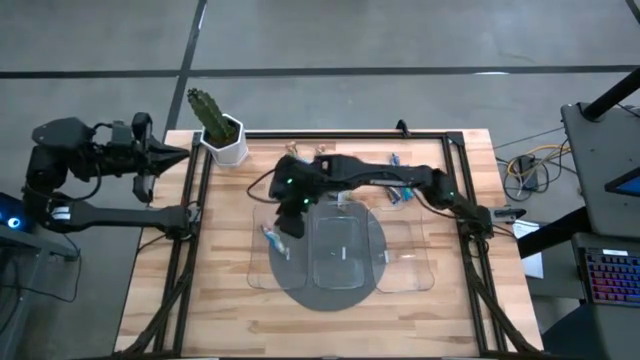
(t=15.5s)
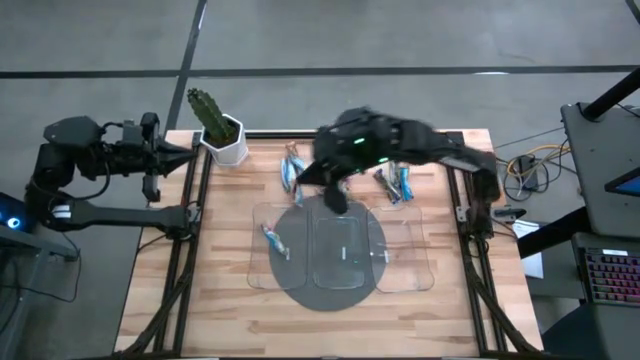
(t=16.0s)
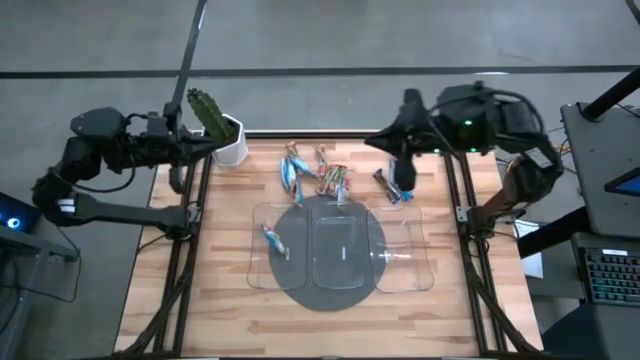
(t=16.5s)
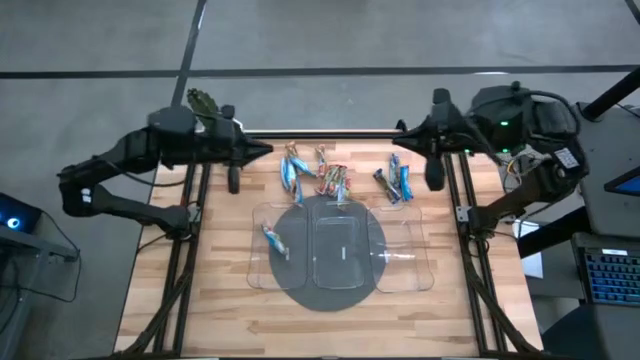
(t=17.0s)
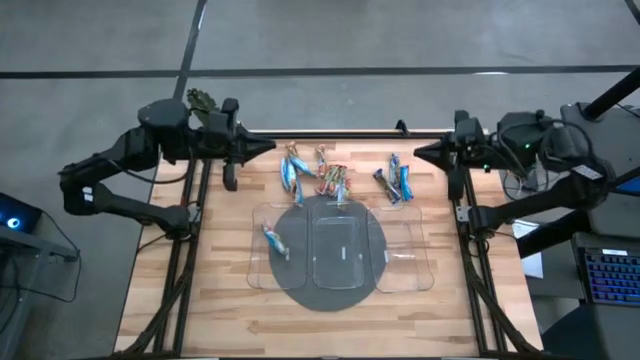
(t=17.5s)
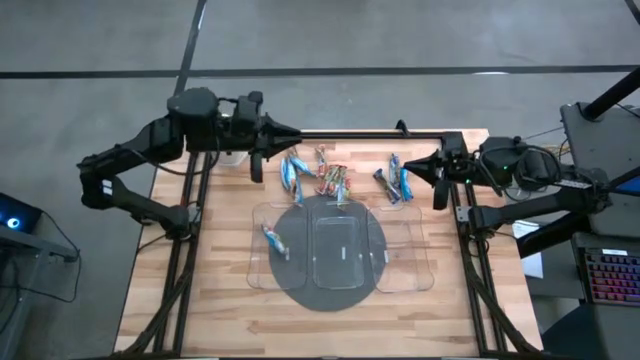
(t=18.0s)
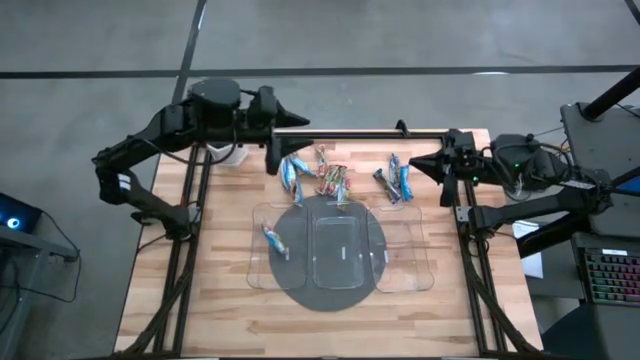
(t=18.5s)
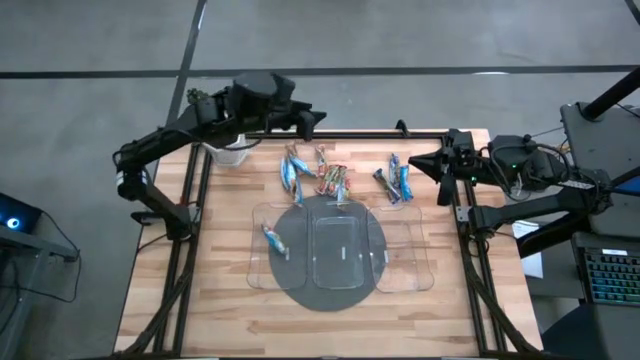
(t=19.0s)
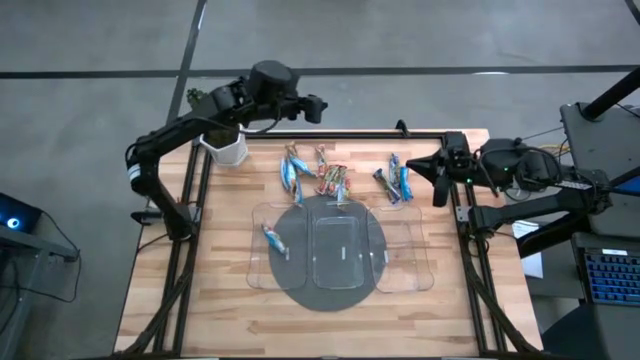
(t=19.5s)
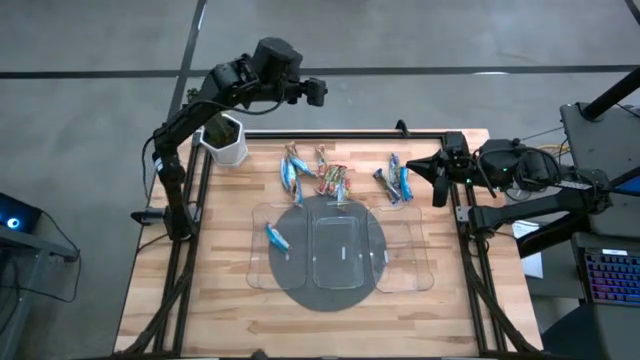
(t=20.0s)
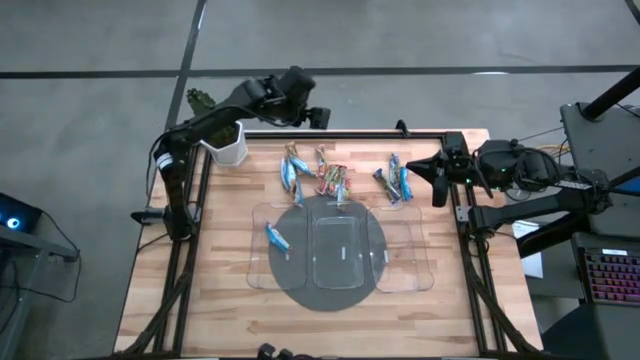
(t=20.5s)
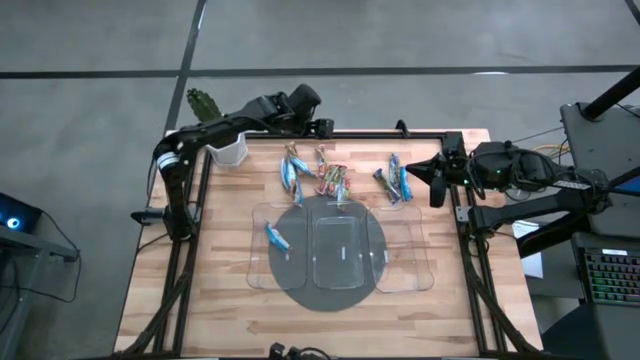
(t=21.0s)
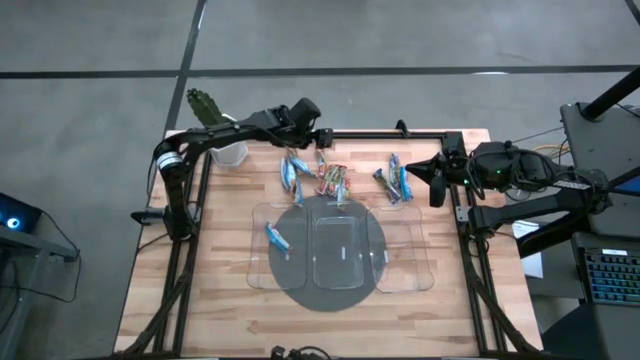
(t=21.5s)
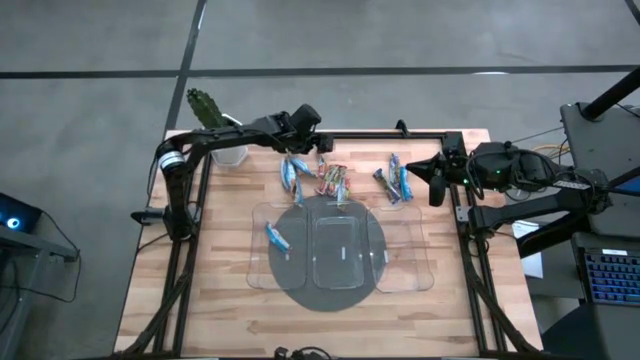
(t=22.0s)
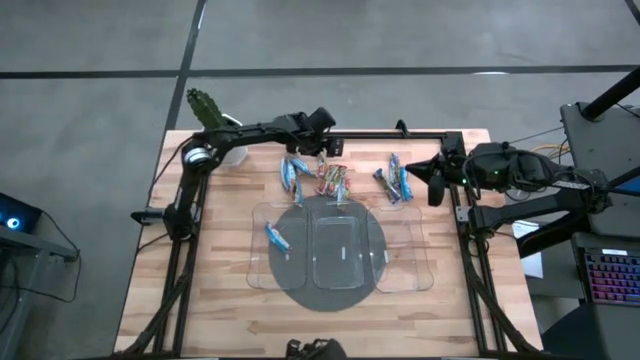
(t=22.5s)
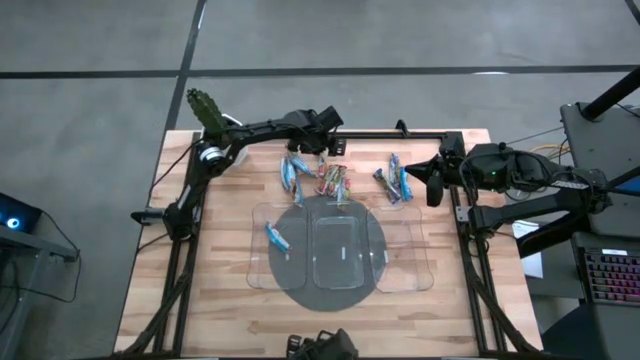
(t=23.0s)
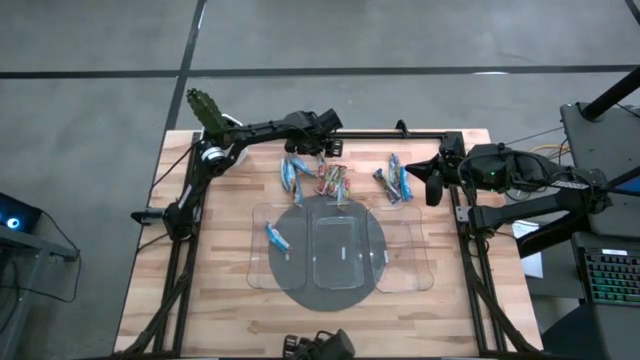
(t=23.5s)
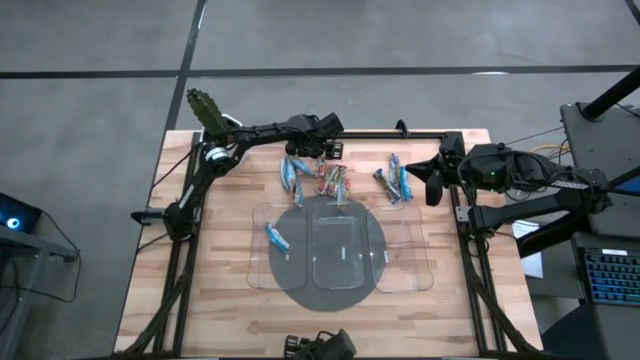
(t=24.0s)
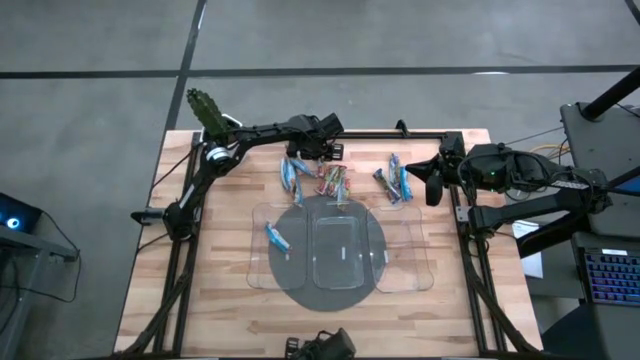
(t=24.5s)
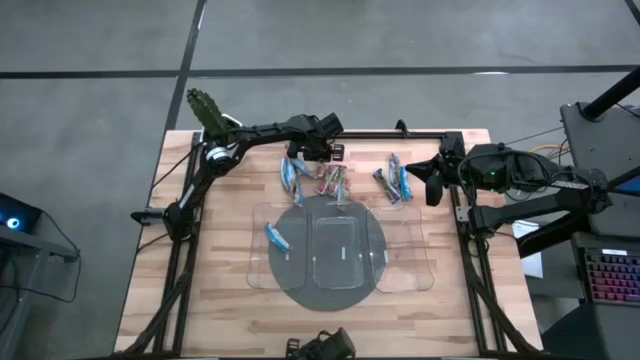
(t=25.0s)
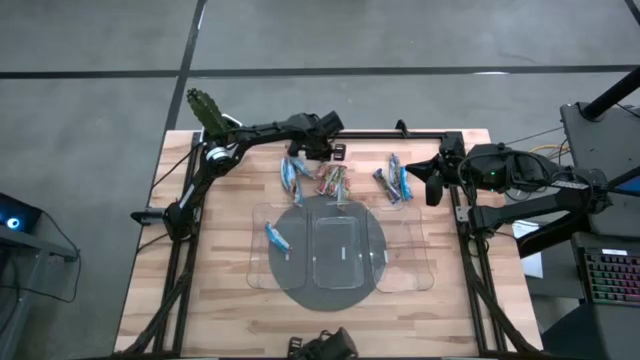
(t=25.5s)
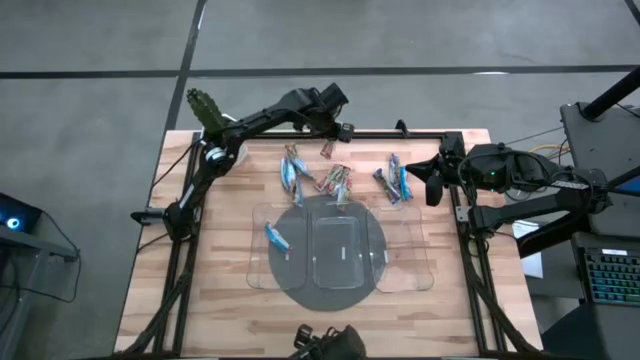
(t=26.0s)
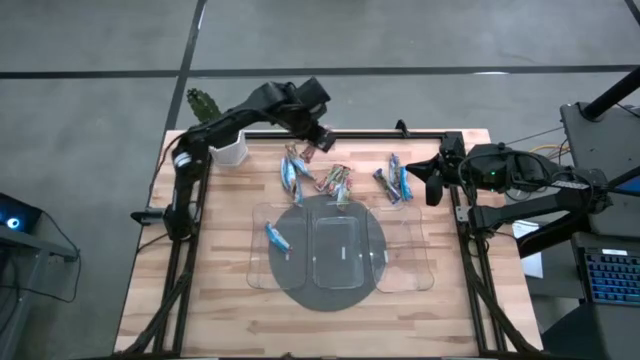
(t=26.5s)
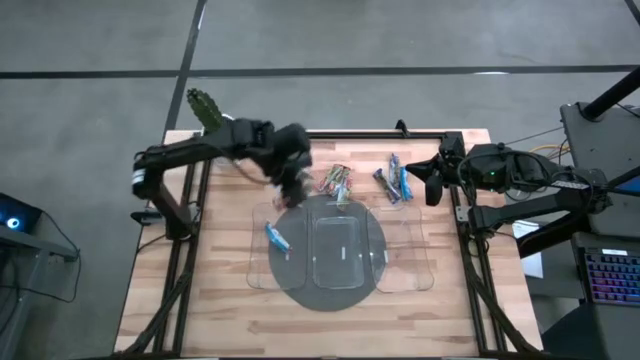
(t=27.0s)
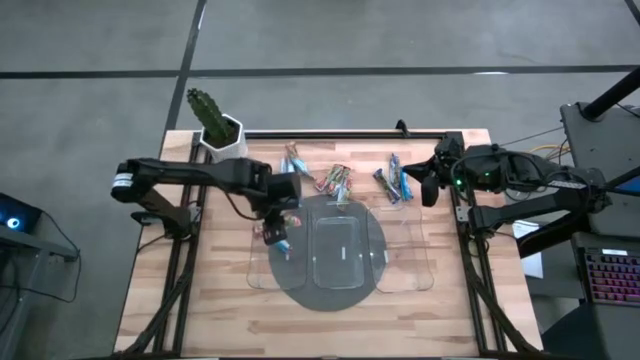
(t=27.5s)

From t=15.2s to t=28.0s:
Task: Pick and place Granola Bars by type
Put the red granola bar into the left transparent bin

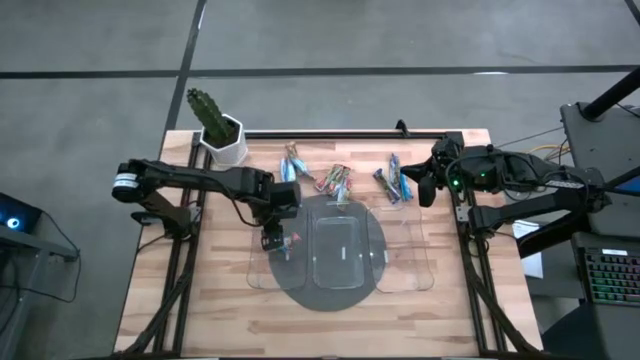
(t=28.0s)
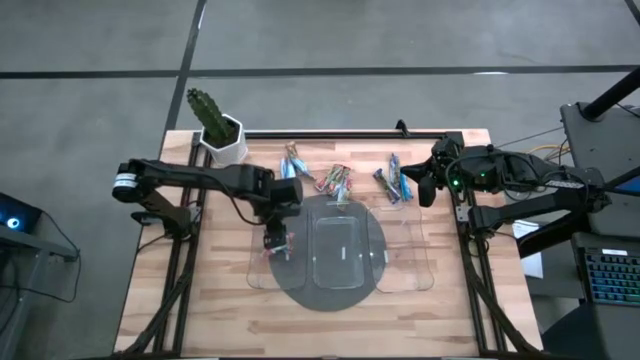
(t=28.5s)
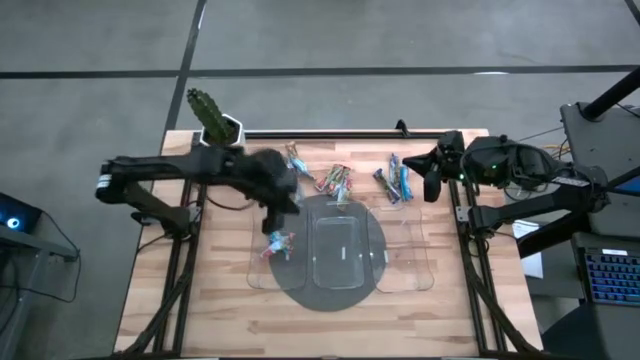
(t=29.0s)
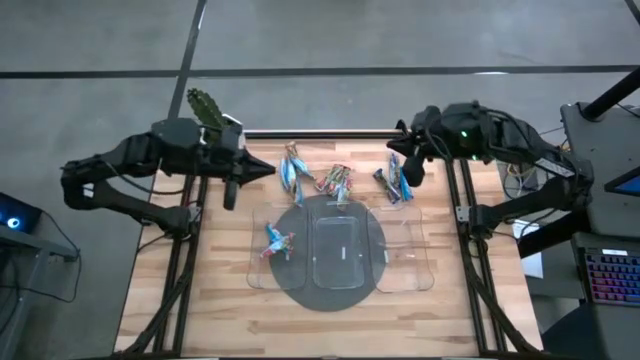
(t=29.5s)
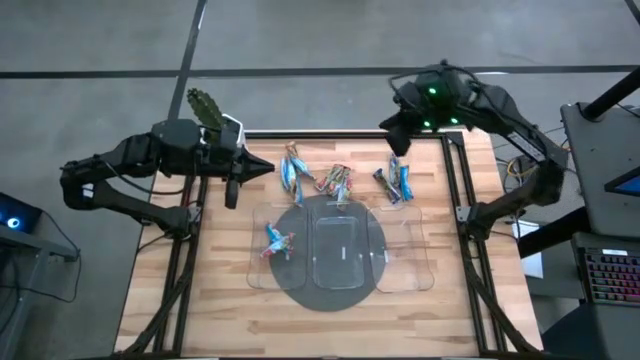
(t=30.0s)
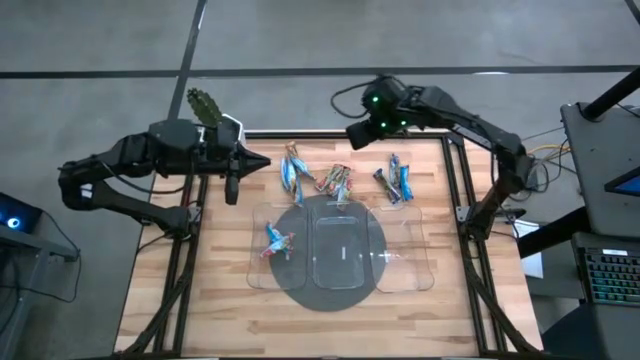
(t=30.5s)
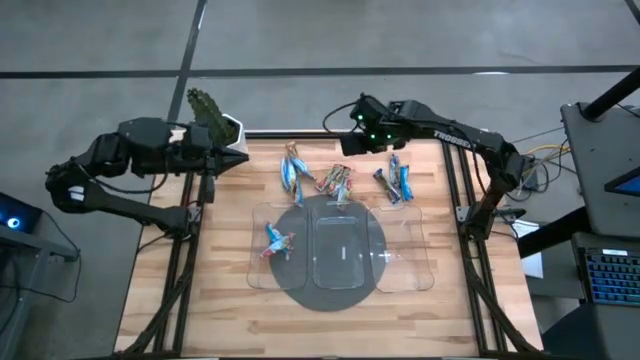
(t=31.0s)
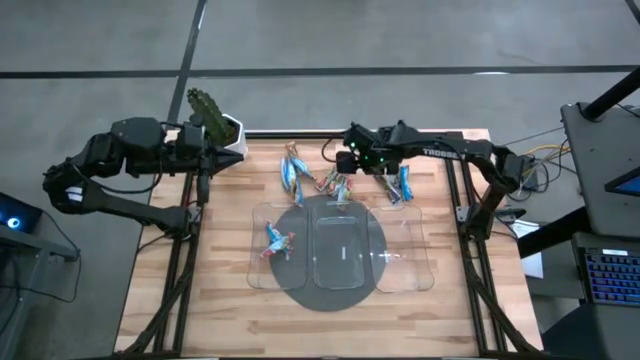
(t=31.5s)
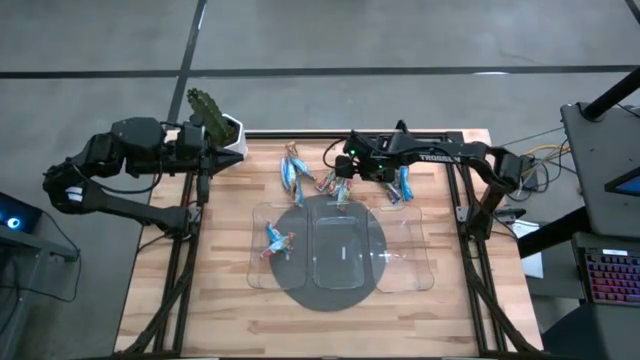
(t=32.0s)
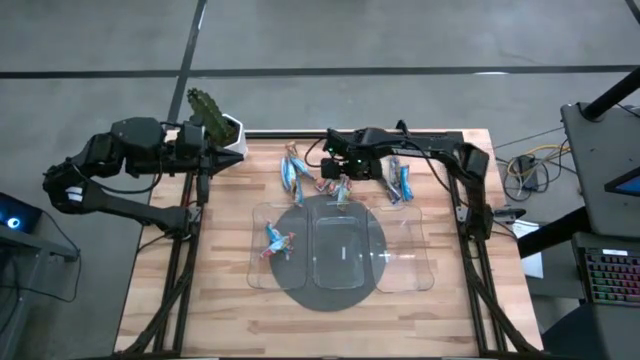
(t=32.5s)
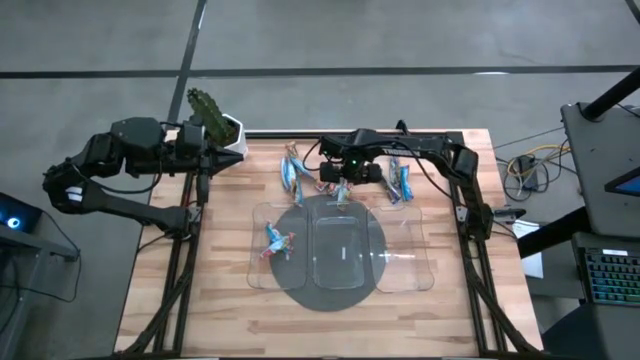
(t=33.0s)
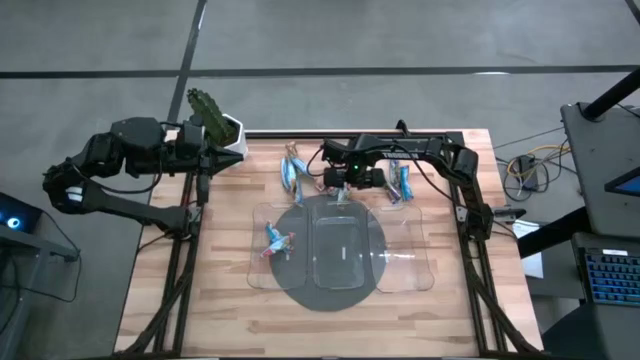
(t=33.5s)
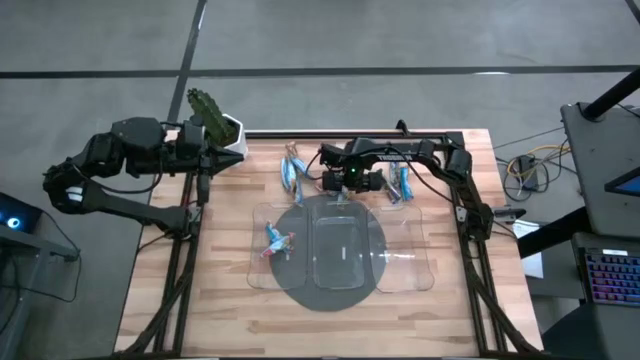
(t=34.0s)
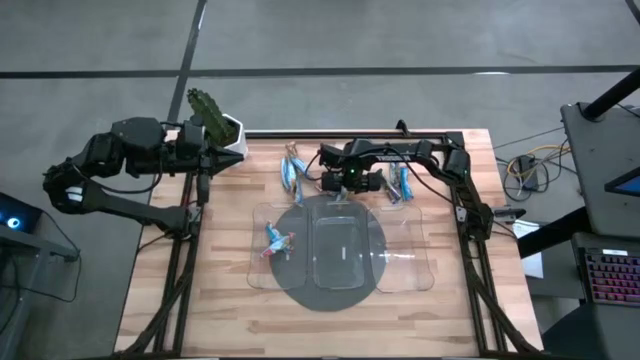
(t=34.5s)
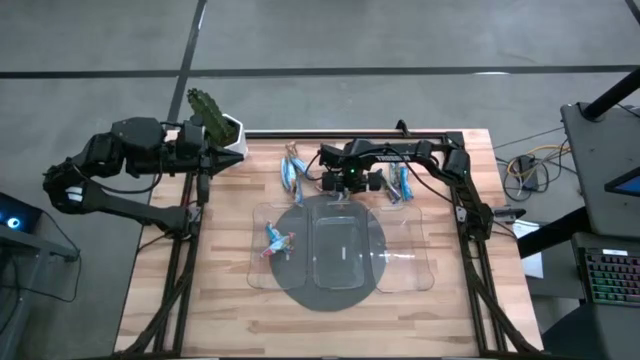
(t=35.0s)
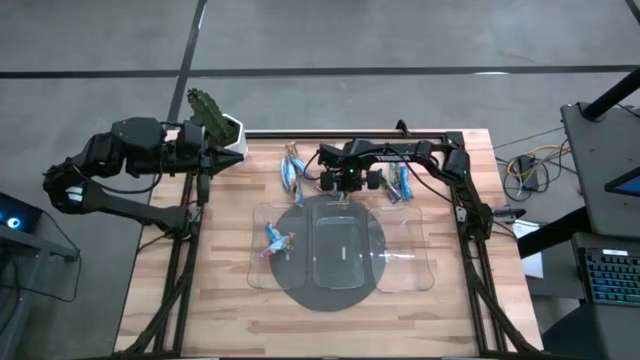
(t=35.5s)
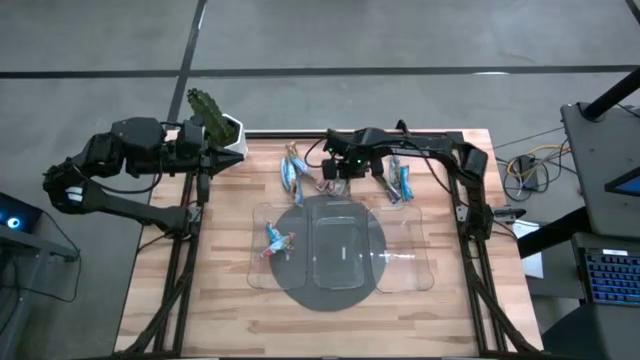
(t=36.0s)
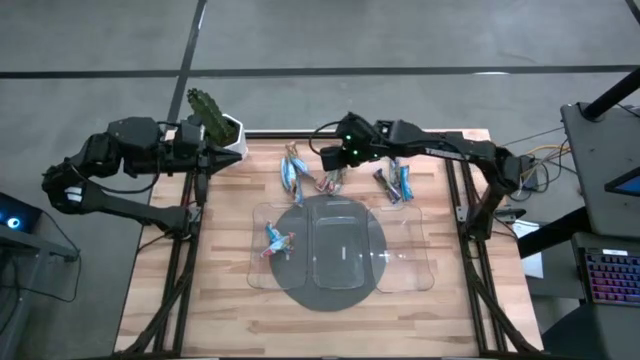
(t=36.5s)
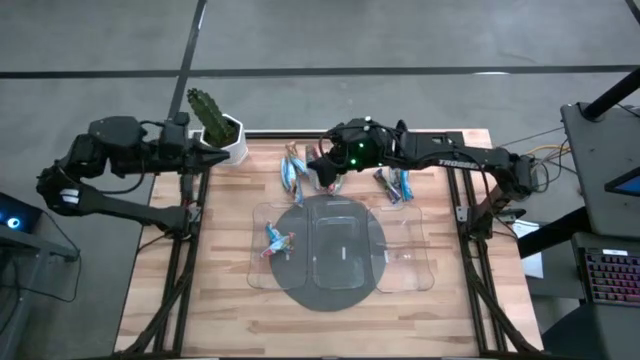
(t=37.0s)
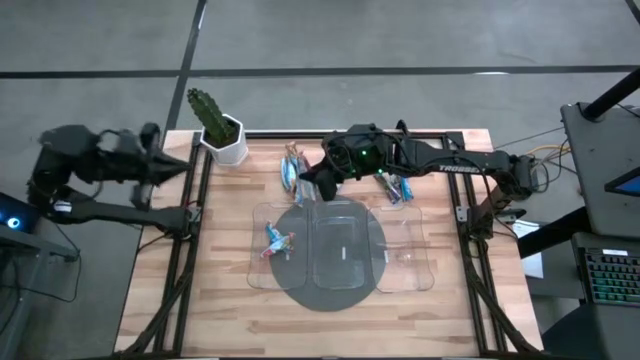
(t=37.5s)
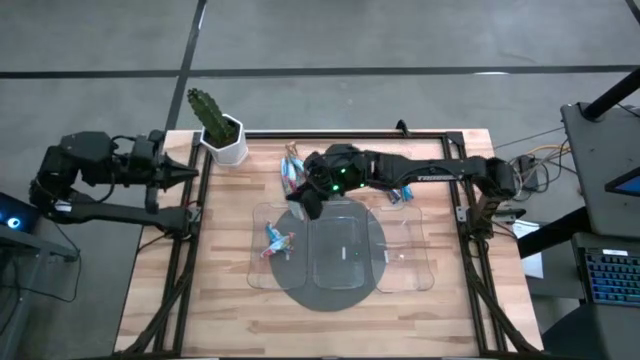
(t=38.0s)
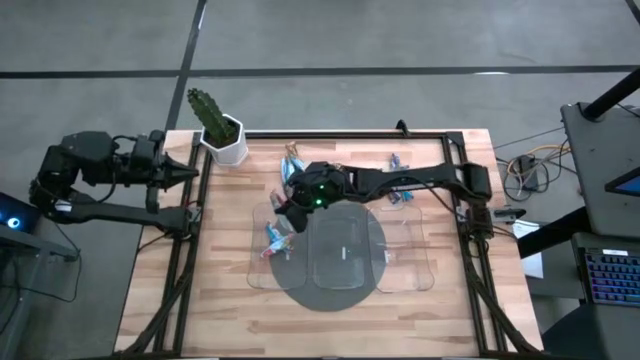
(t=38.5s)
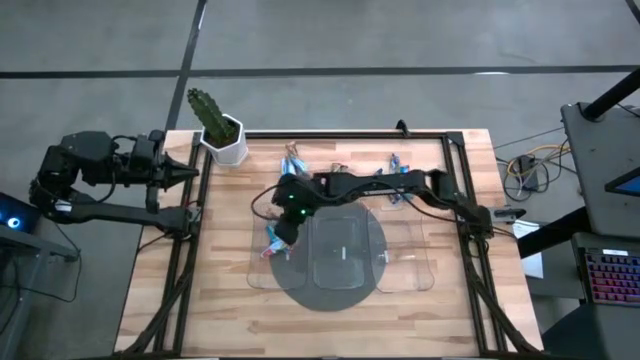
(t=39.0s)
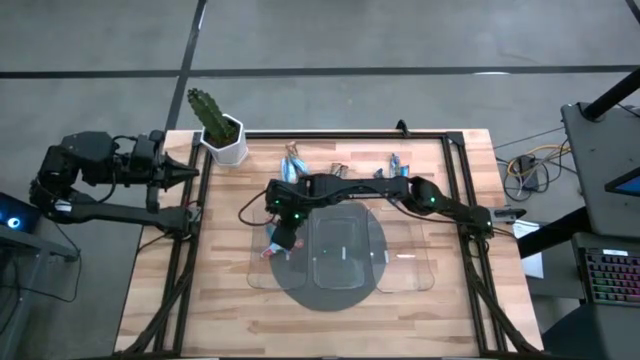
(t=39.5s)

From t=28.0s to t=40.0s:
Put the red granola bar into the left transparent bin
